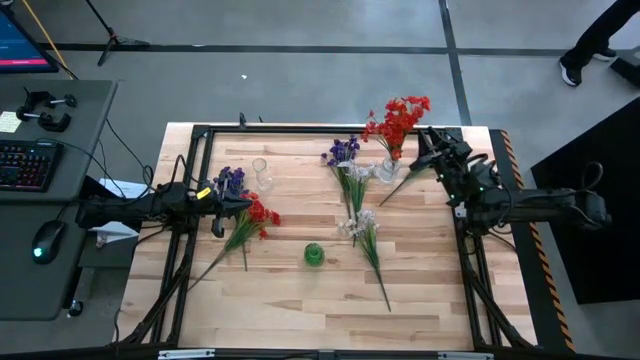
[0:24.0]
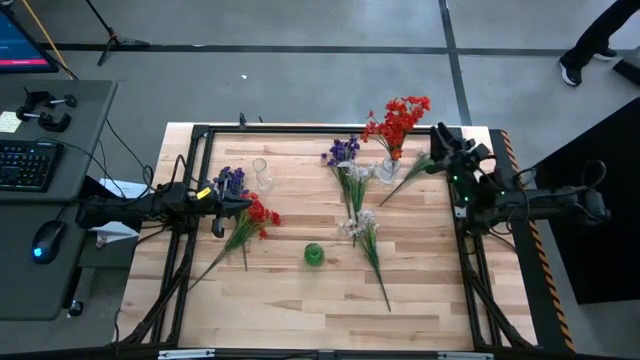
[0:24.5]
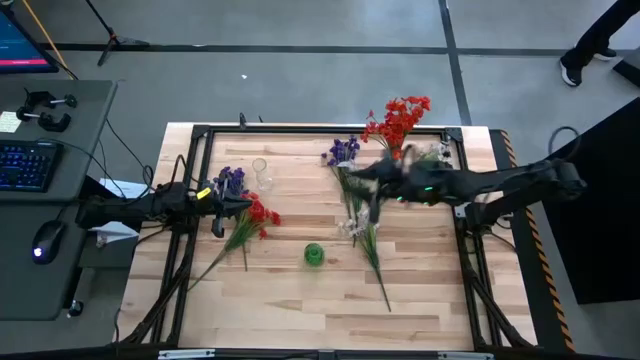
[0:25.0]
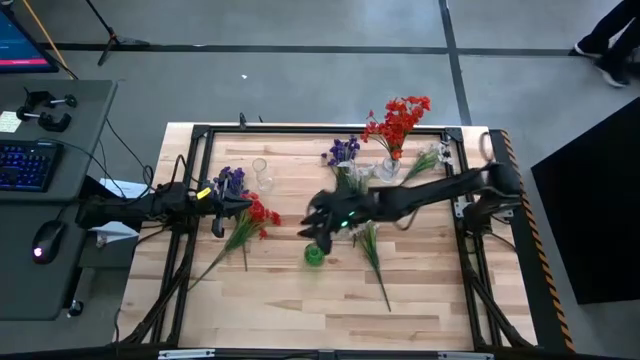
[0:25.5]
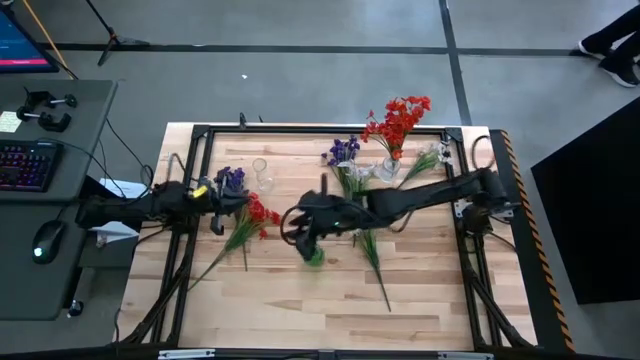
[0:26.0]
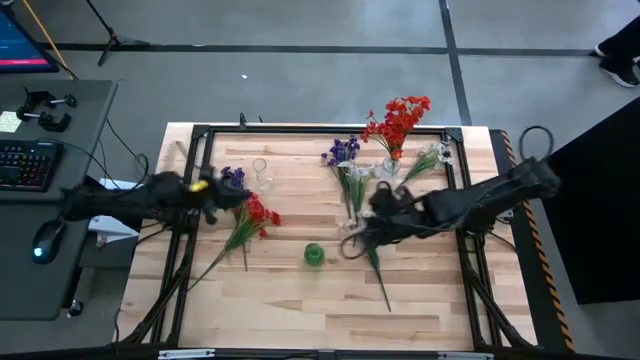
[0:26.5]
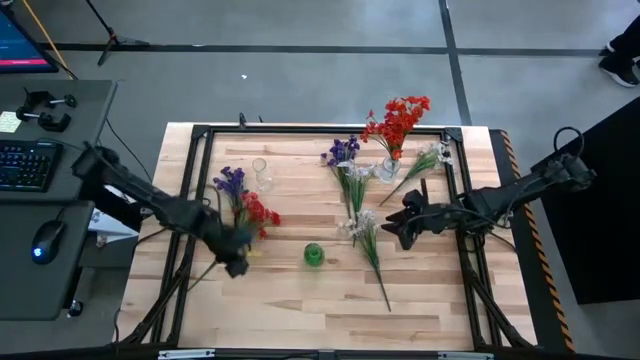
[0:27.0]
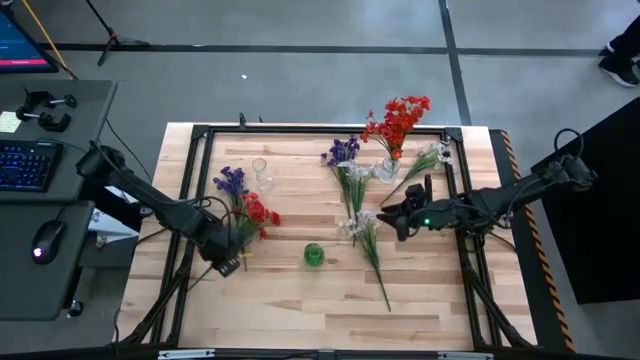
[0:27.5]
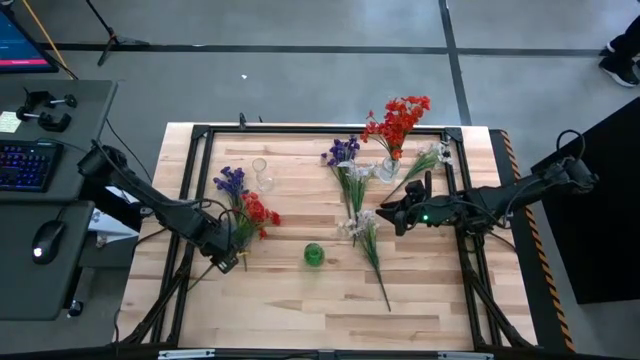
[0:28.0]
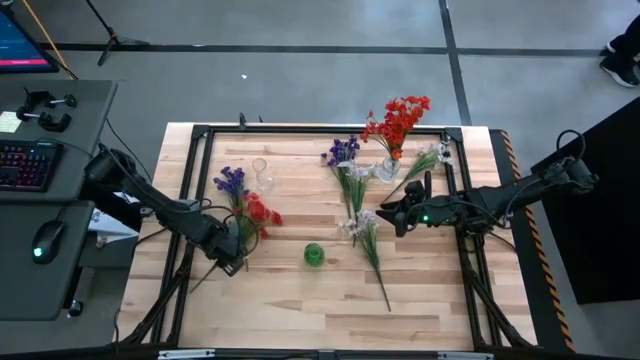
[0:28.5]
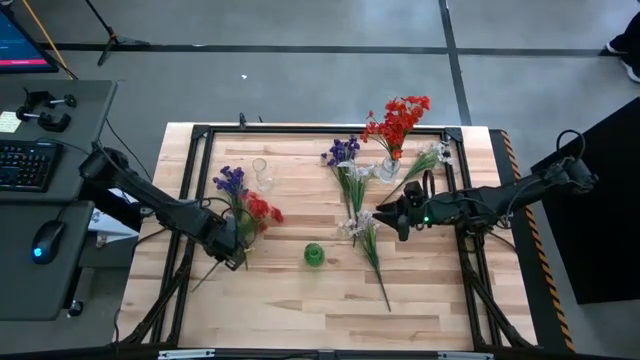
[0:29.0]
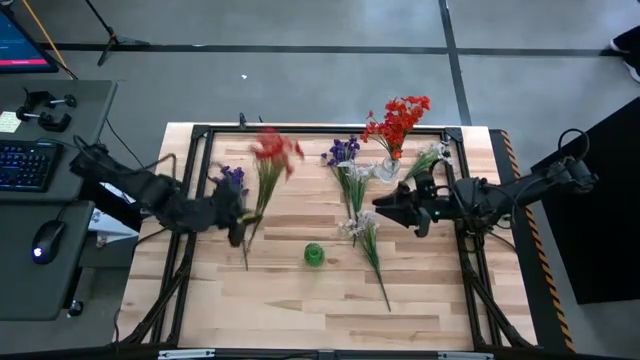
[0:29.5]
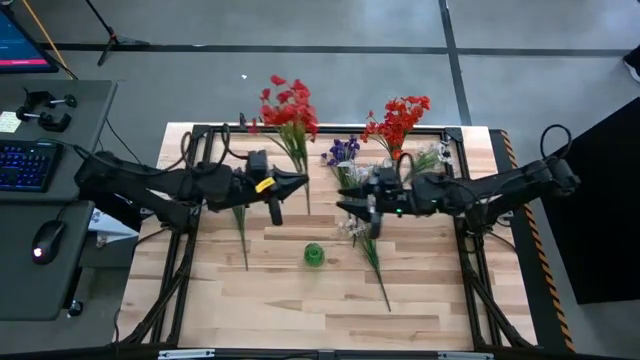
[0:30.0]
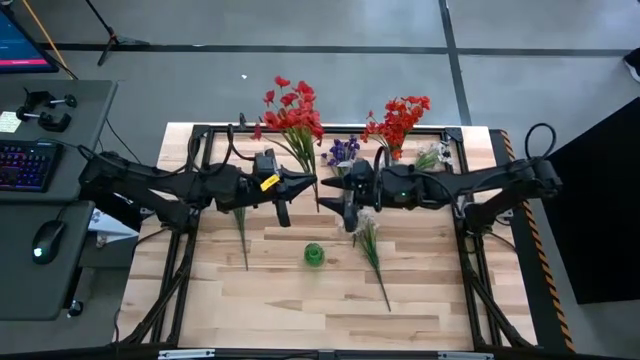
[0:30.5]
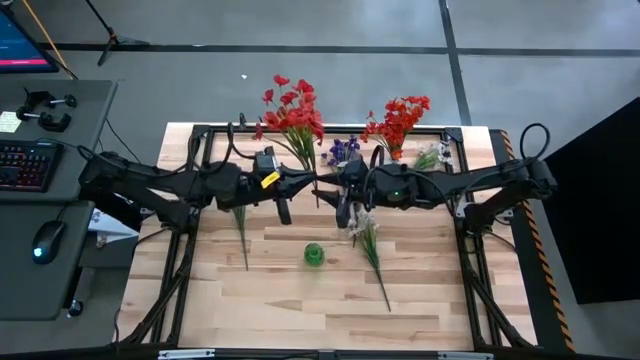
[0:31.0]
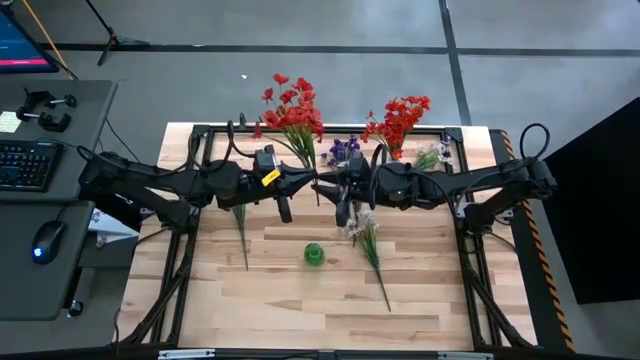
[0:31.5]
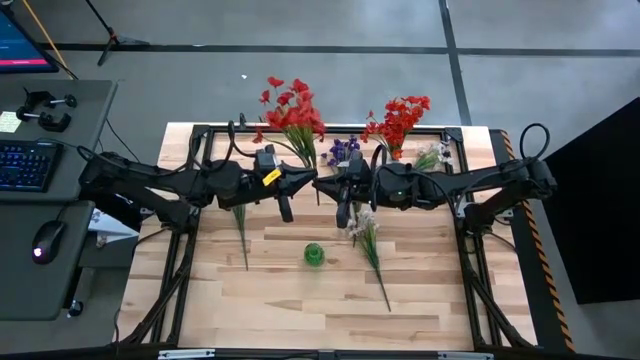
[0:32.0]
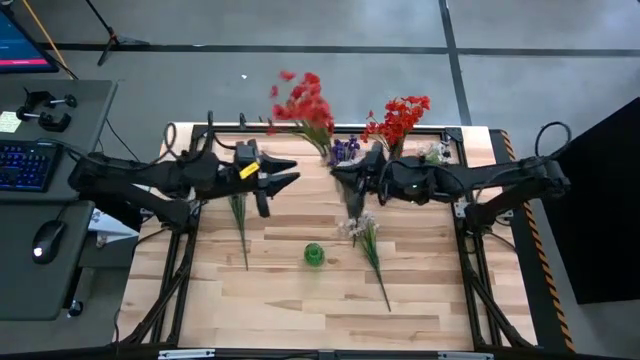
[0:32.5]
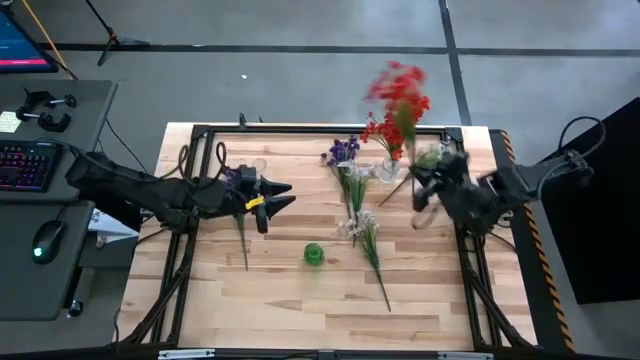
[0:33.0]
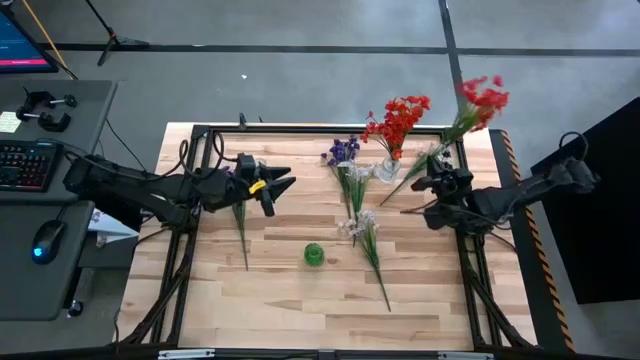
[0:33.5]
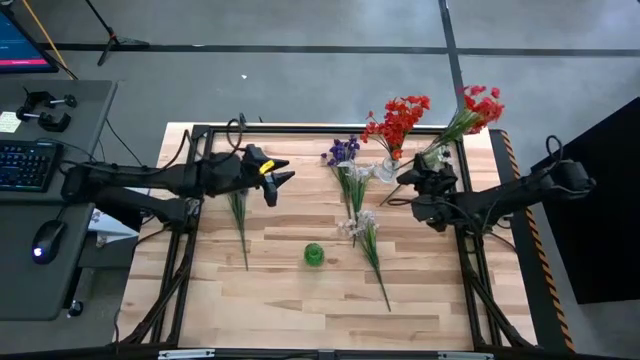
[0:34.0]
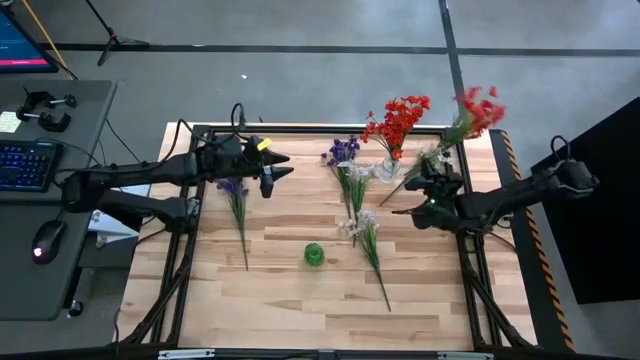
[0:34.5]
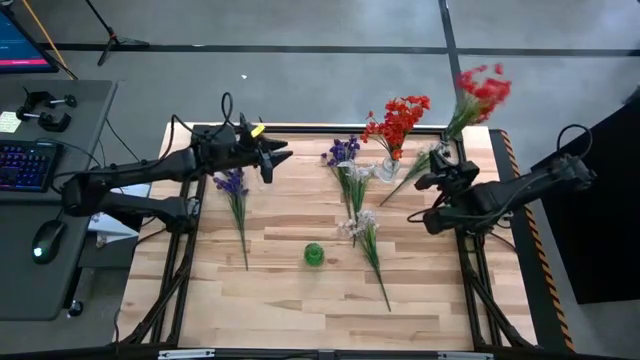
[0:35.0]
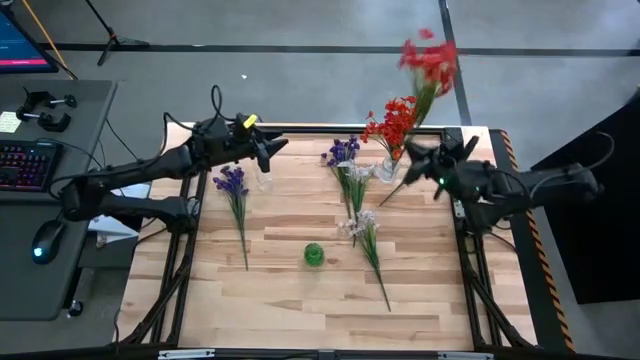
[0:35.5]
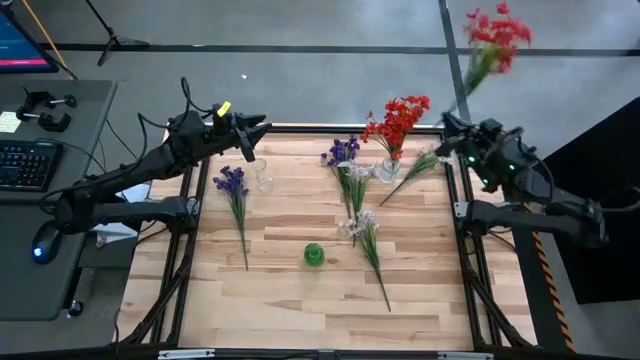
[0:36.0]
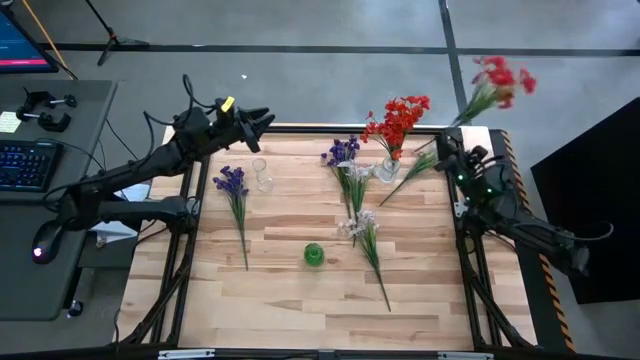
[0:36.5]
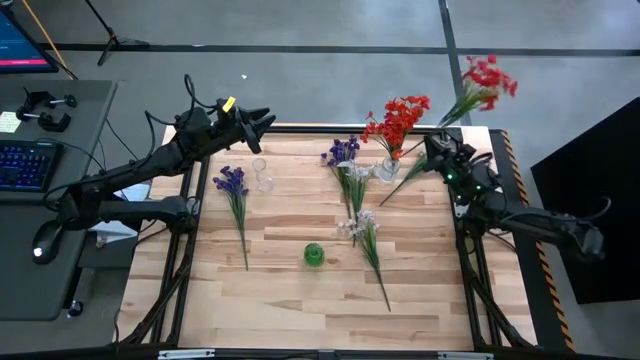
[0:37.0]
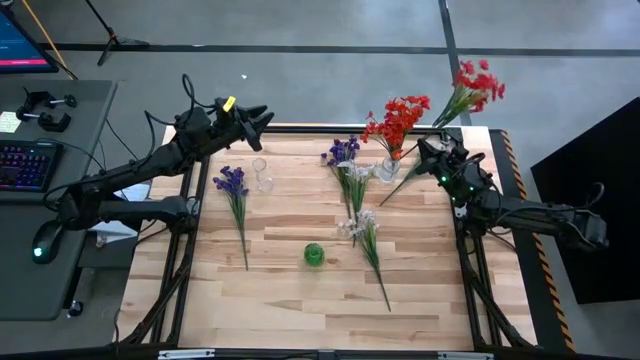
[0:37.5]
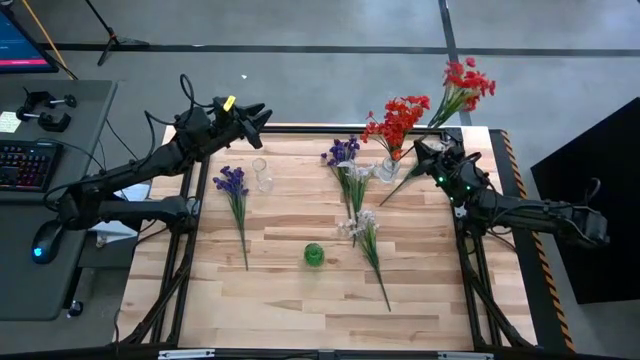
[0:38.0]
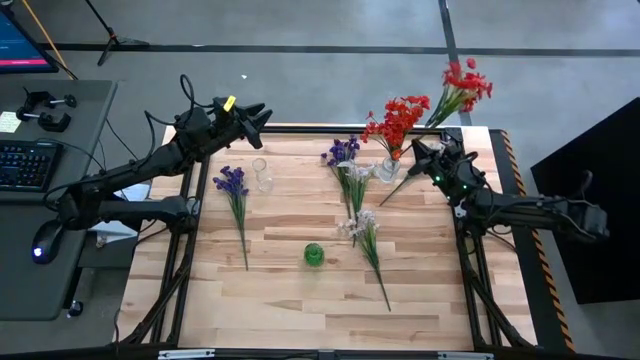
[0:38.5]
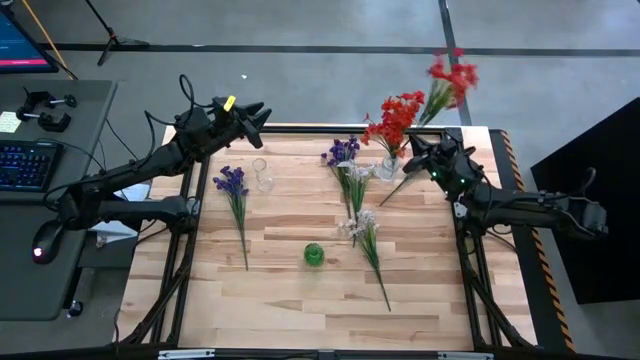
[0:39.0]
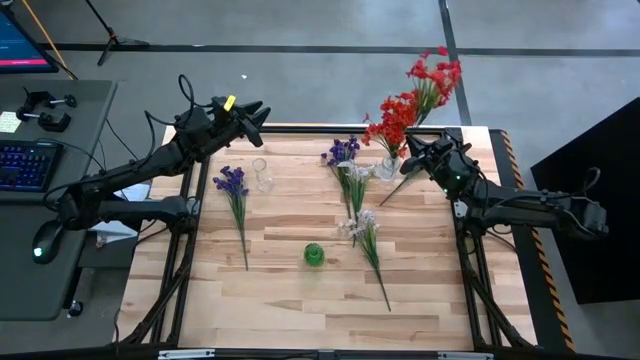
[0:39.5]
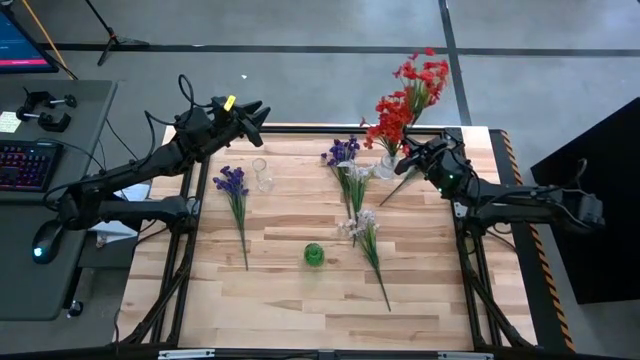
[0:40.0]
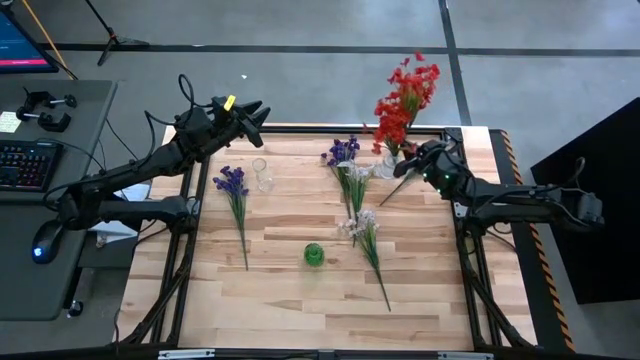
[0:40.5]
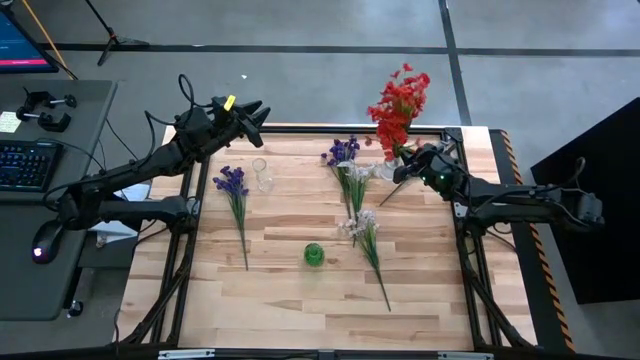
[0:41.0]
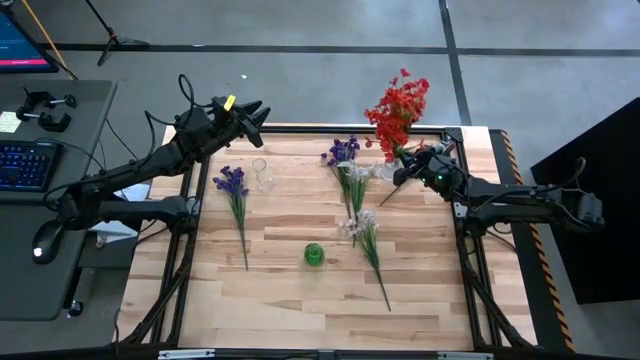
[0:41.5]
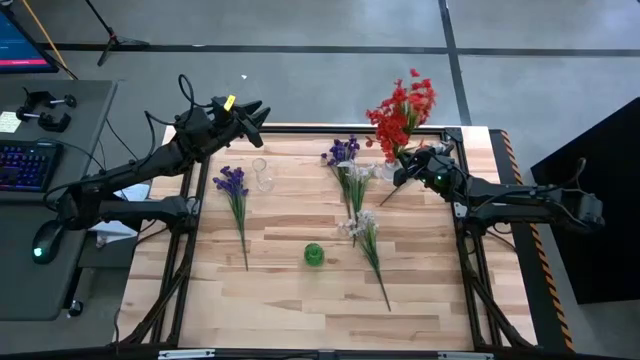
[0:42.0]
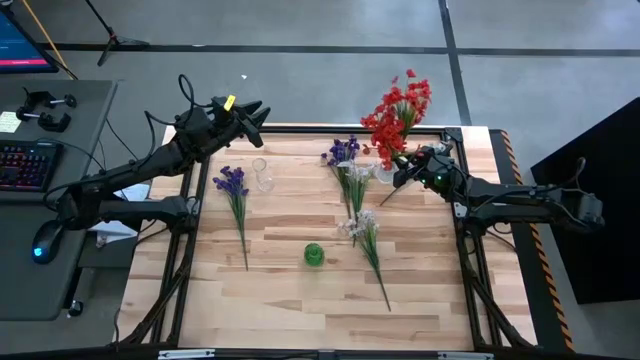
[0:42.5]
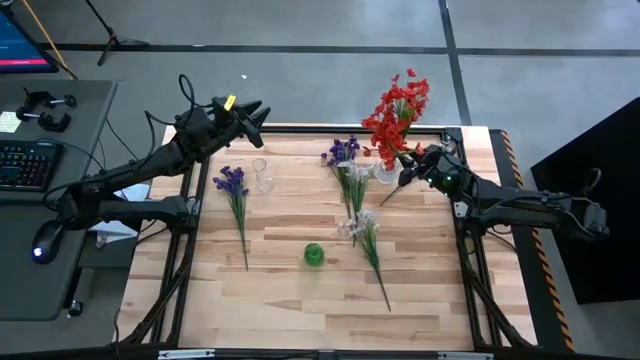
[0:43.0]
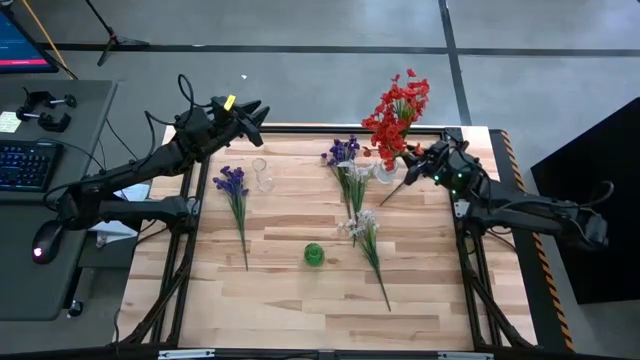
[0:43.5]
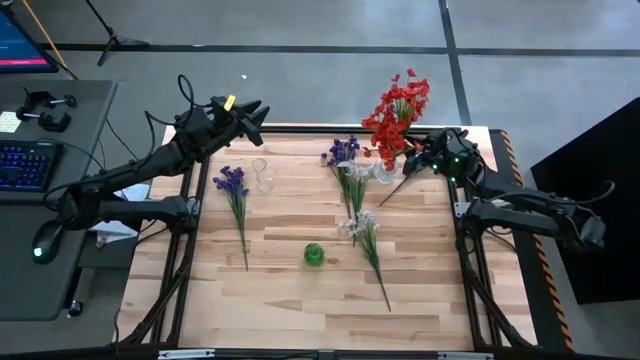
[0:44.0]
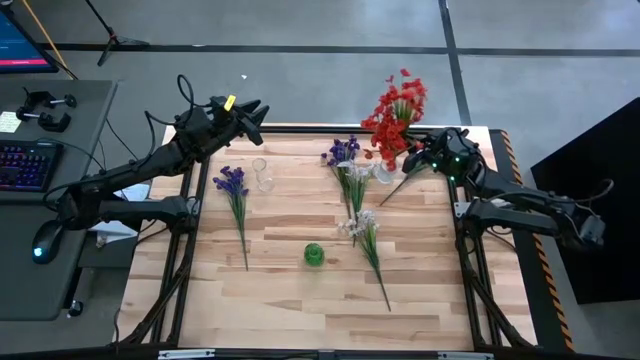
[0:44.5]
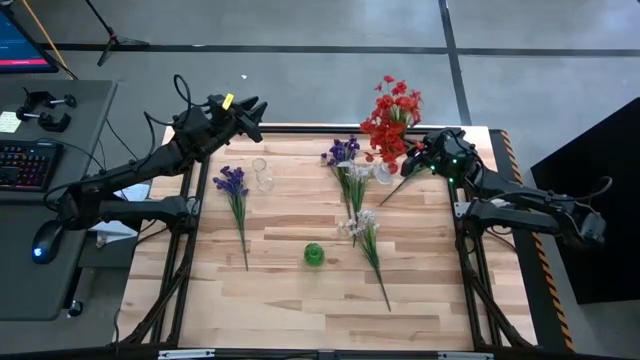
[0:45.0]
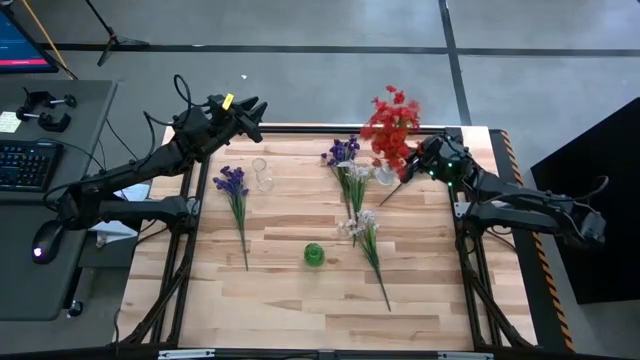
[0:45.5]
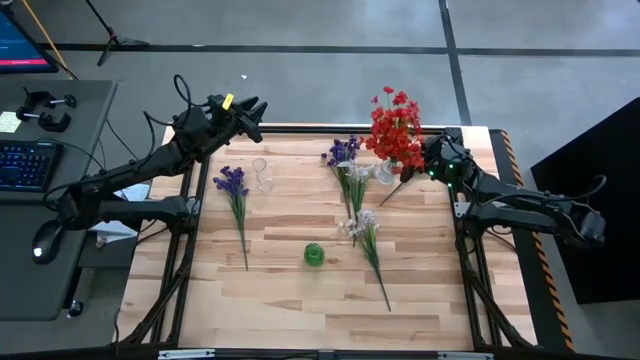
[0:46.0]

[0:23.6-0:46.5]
Task: Sort flowers into vase by color
Put the orange flowers into the top right transparent flower vase
